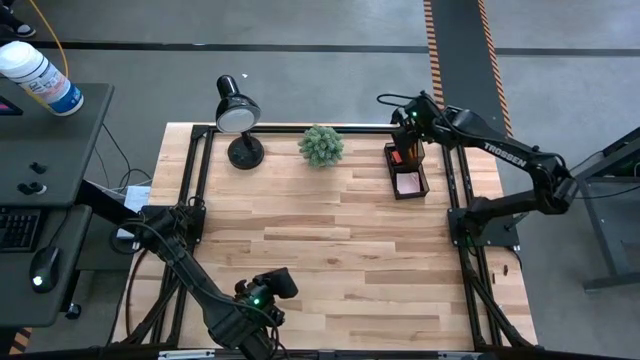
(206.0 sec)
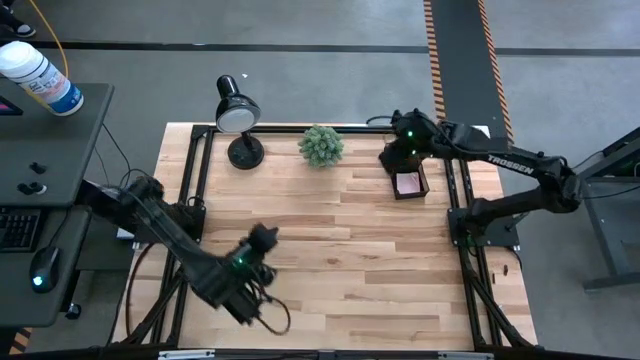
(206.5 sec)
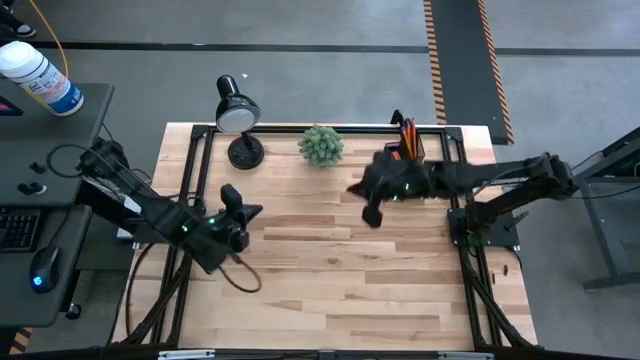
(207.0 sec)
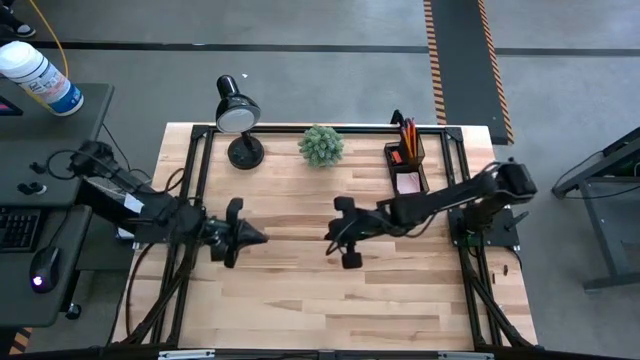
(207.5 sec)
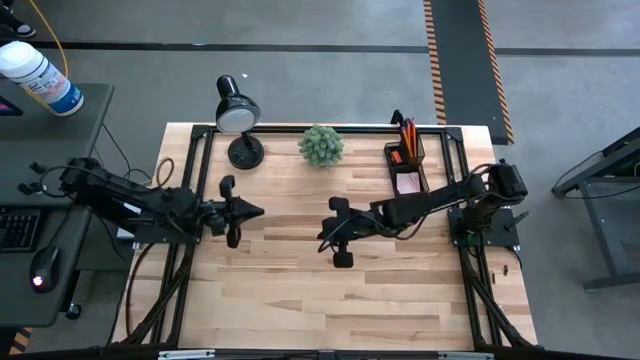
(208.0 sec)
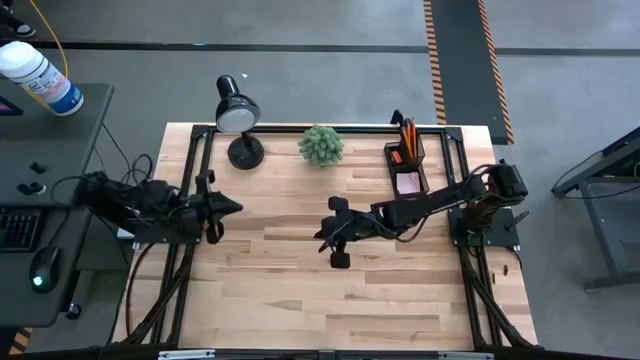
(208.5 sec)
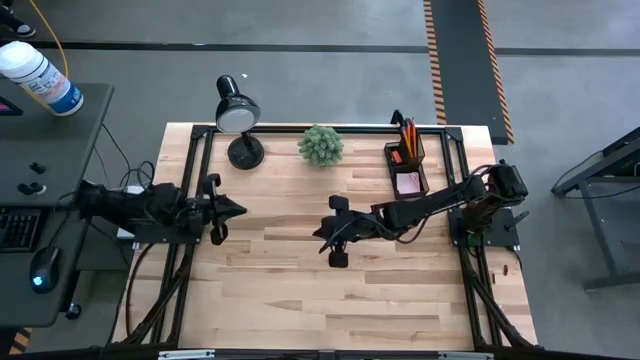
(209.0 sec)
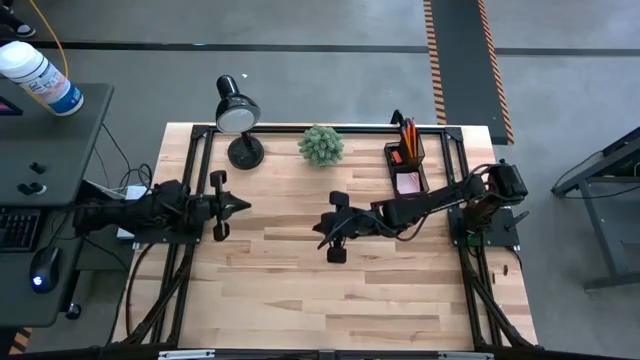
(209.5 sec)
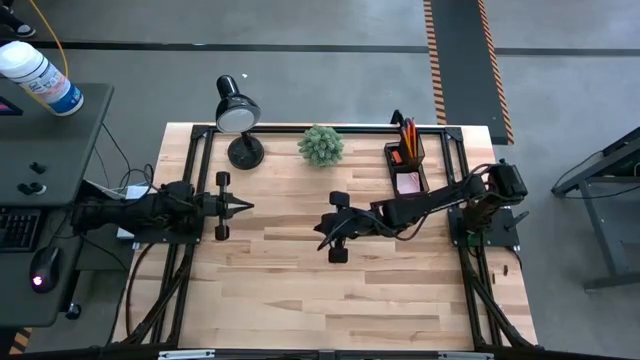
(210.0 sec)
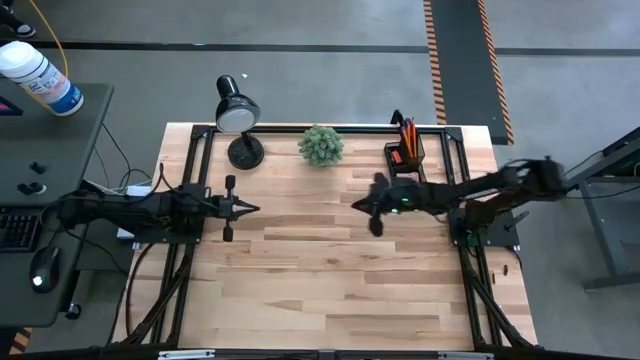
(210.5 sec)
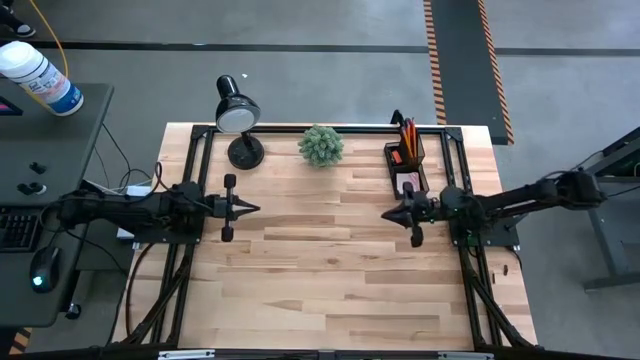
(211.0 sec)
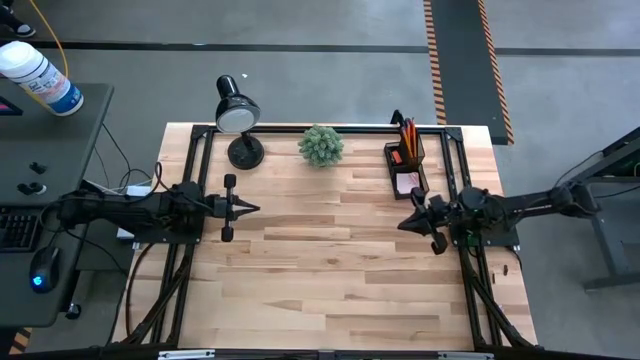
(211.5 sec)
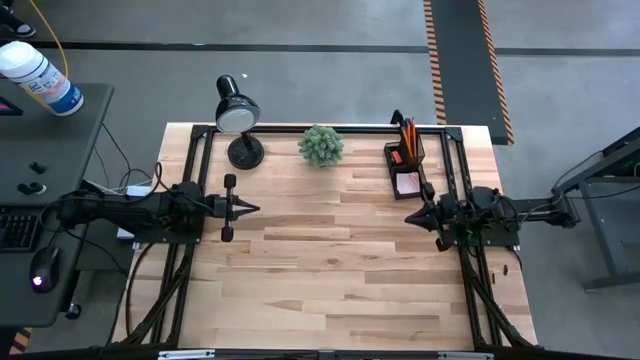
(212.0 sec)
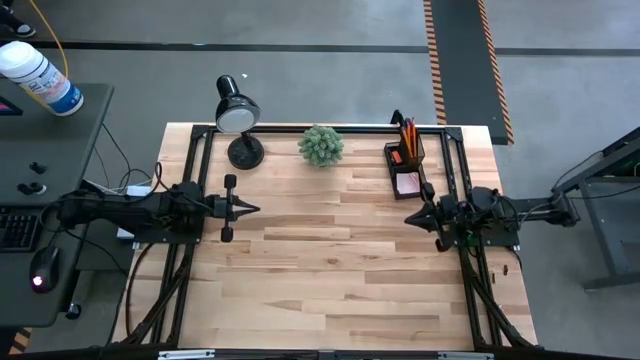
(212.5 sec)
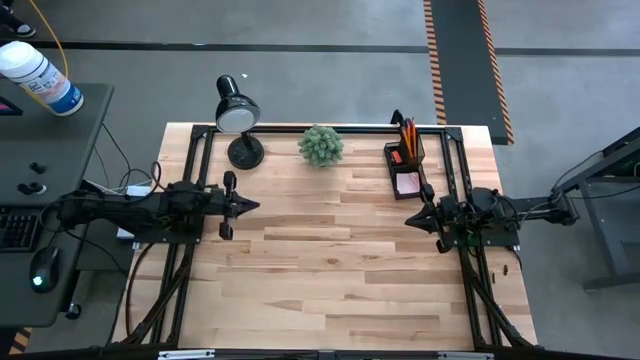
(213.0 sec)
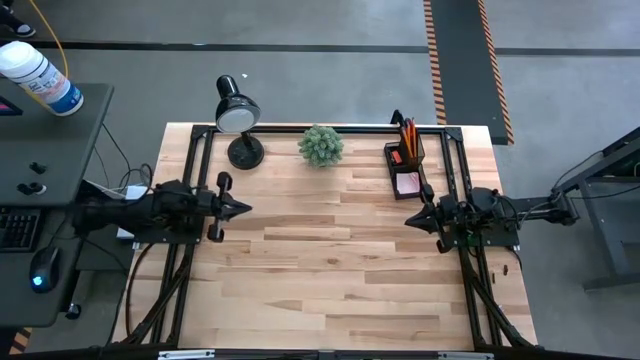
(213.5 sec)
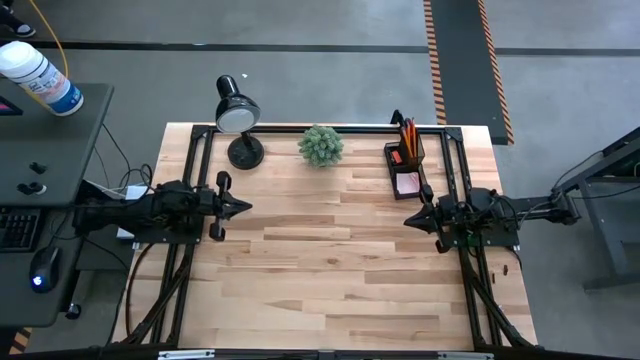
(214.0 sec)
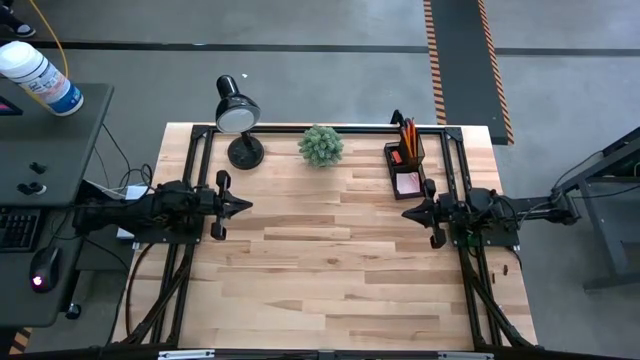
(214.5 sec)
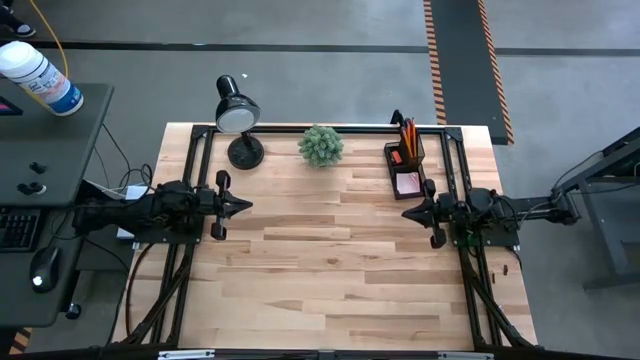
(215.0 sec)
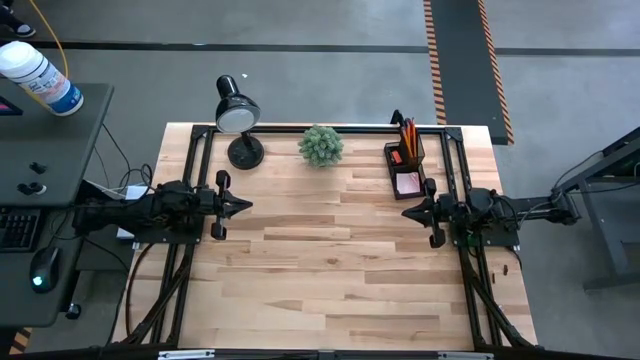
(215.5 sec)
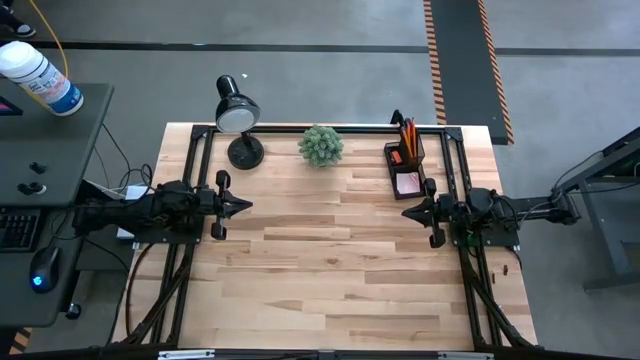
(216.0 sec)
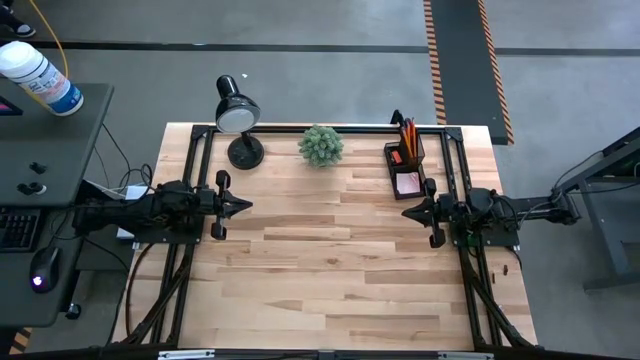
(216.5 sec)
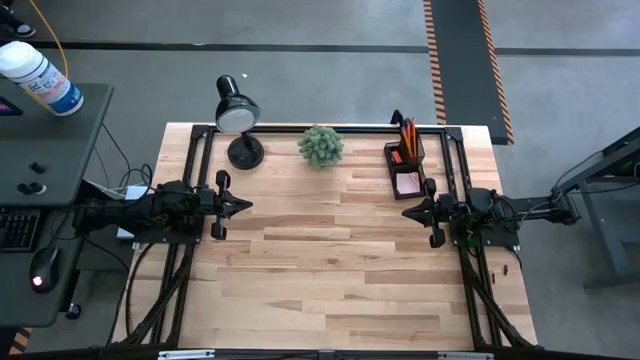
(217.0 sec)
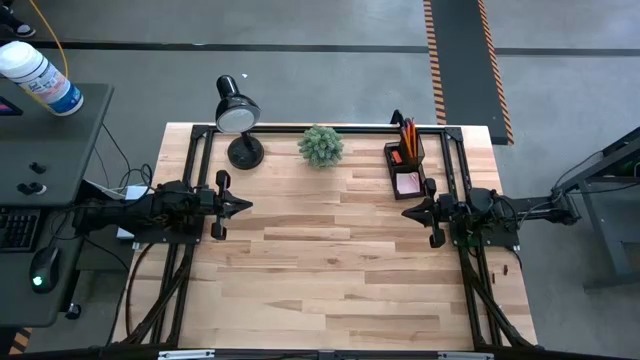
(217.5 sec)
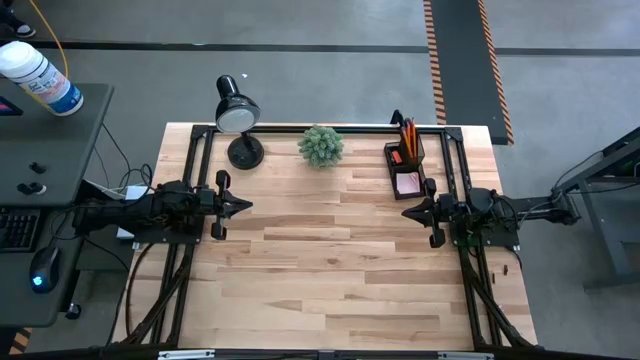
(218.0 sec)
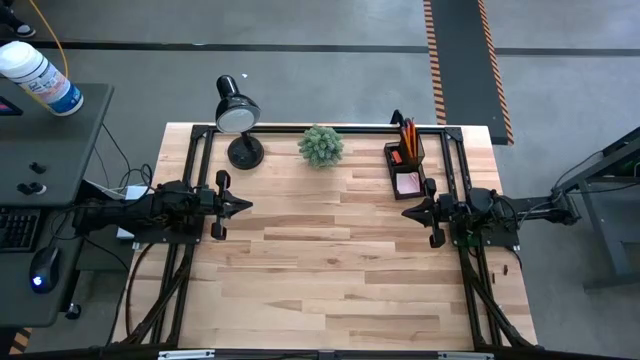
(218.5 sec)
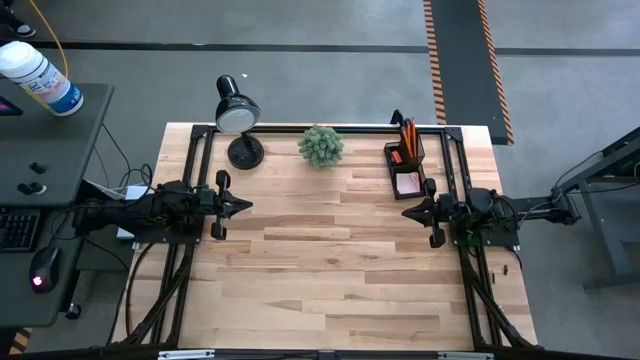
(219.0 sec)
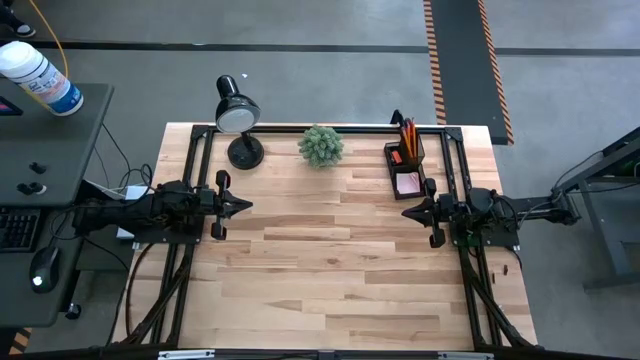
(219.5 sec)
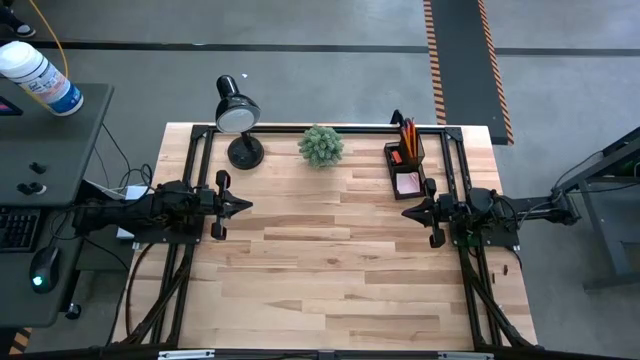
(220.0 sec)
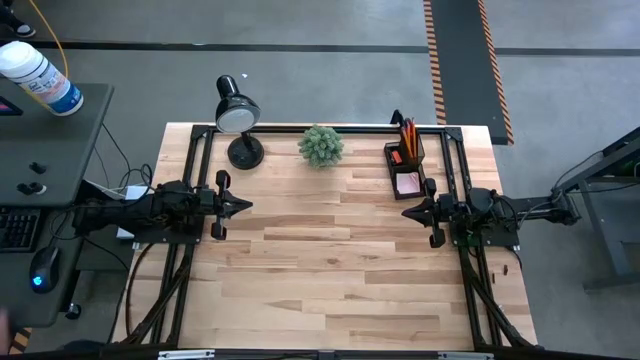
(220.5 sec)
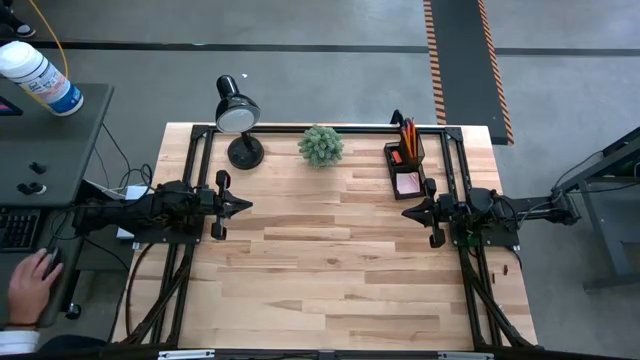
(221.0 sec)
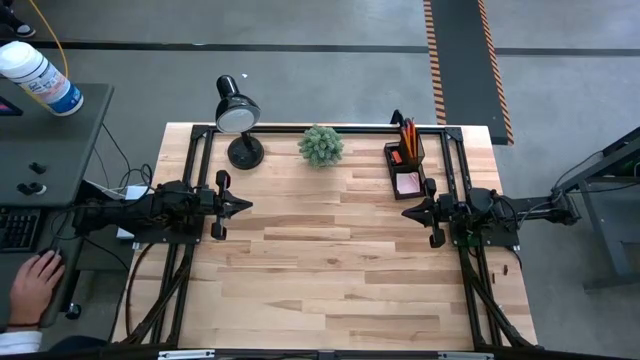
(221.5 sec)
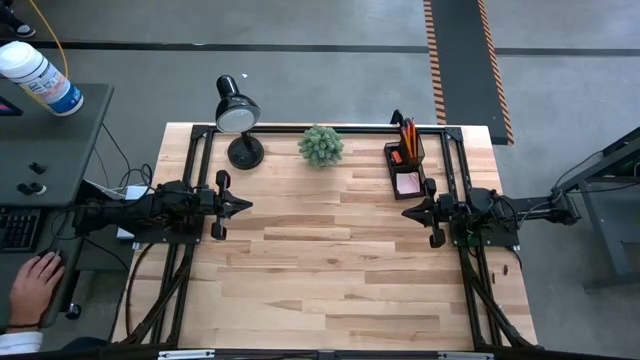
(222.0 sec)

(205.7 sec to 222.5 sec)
Task: Pick and place office supplies into organizer
Return to Home Position

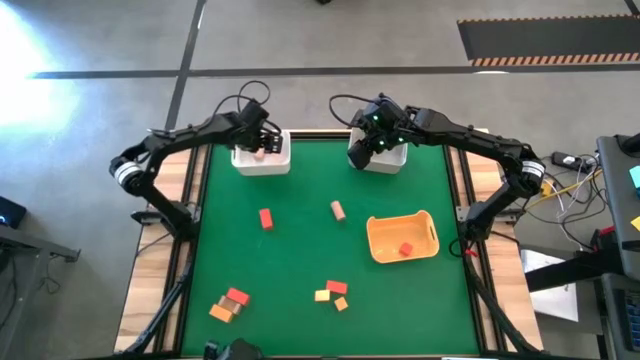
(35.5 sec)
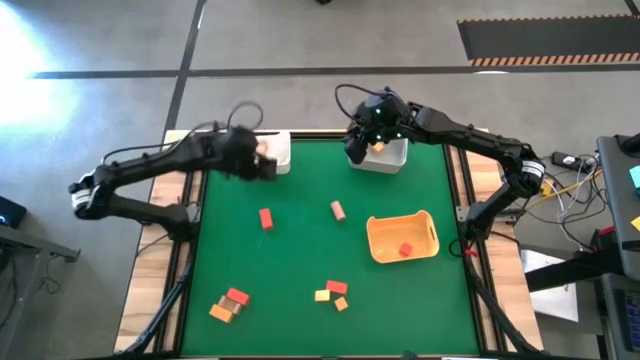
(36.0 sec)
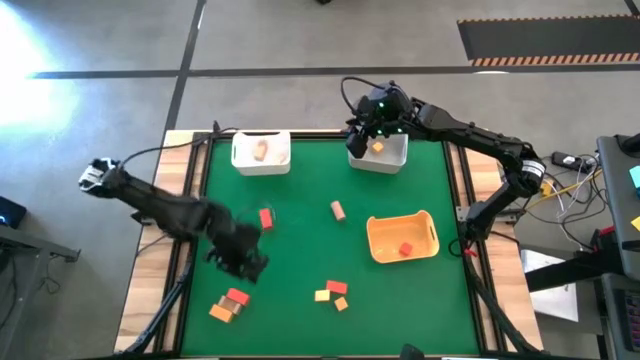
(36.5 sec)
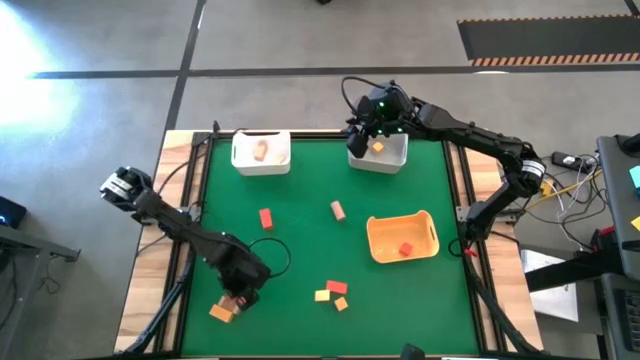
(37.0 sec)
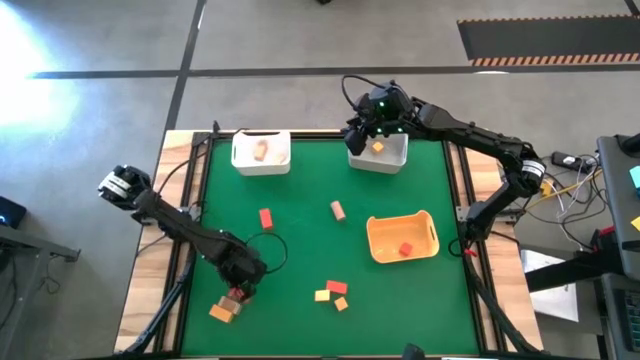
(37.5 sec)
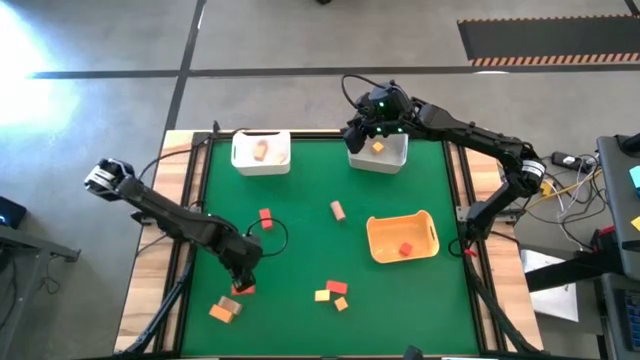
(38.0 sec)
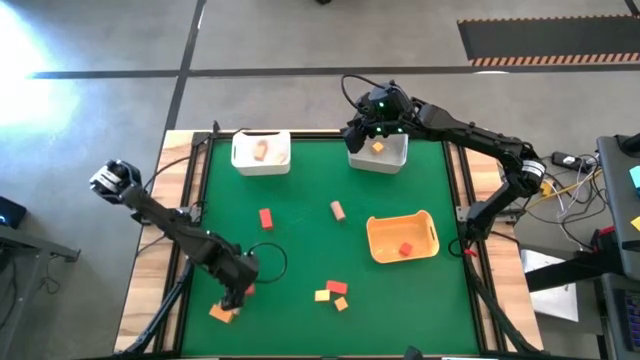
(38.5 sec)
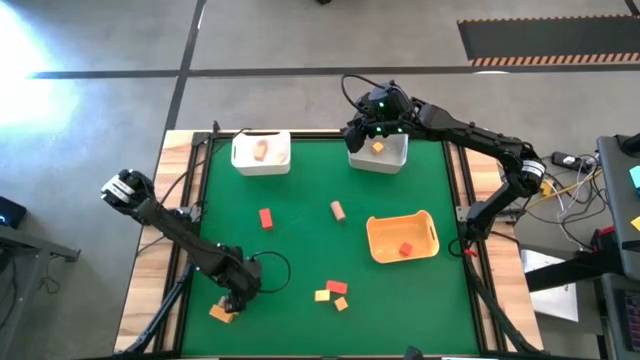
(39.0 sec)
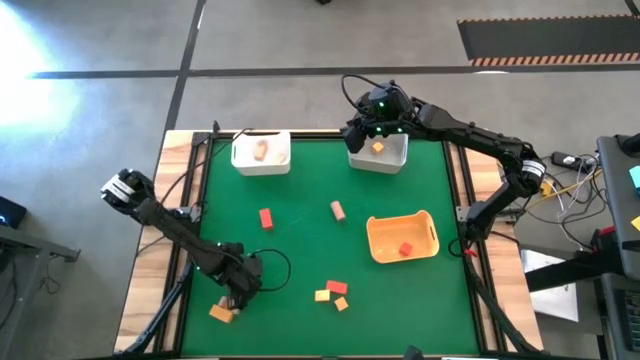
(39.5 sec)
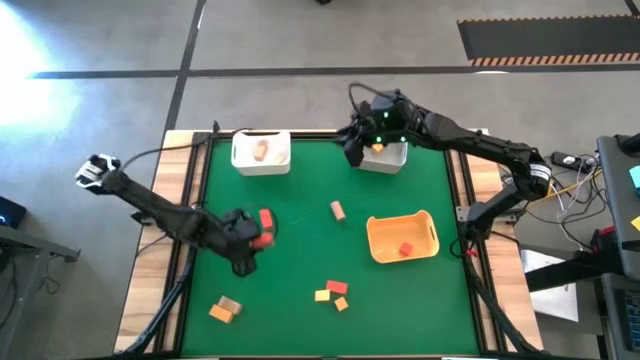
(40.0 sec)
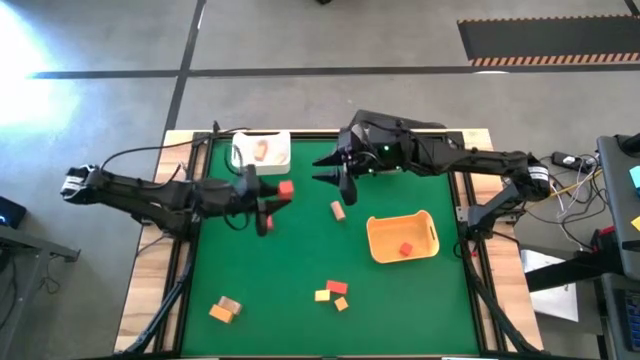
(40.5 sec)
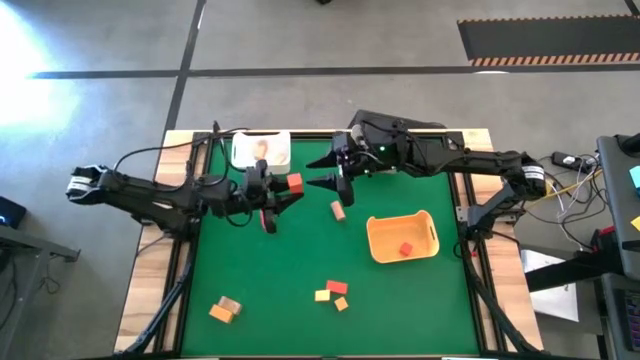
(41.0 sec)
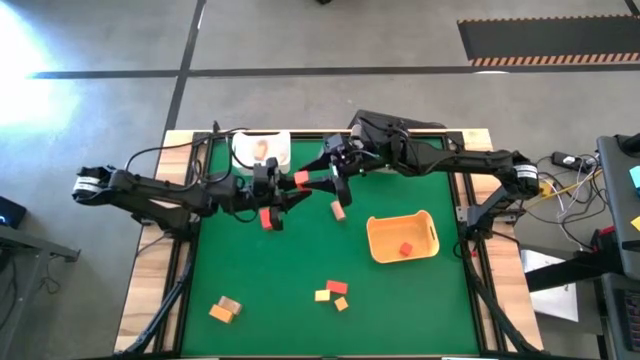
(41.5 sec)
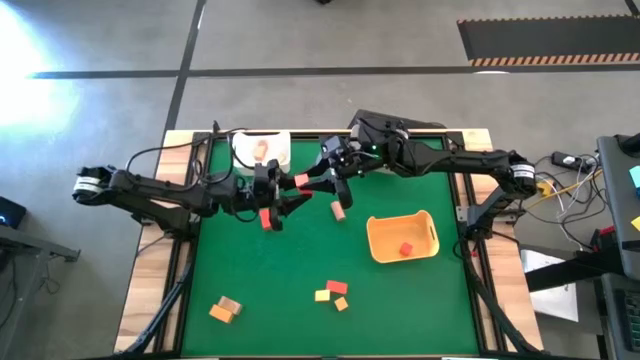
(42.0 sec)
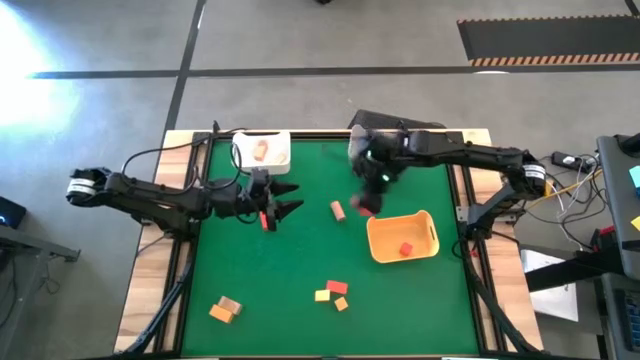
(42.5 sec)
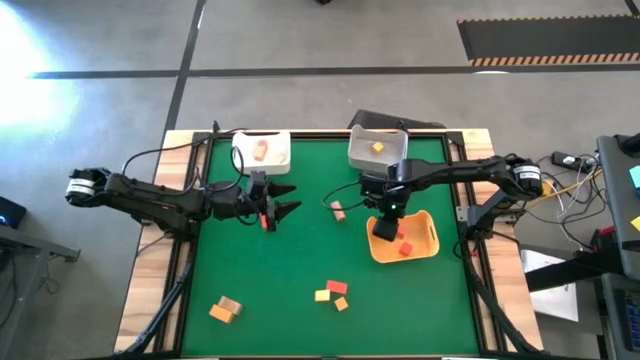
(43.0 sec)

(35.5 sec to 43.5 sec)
Task: Sort & place blocks by color
Put the orange block into the yellow bin
